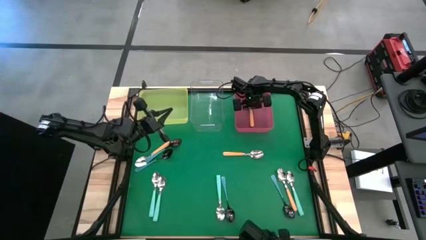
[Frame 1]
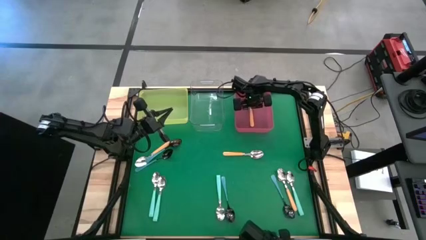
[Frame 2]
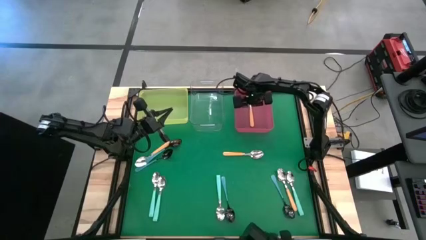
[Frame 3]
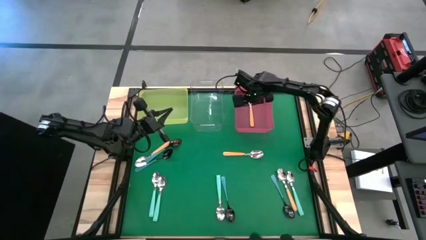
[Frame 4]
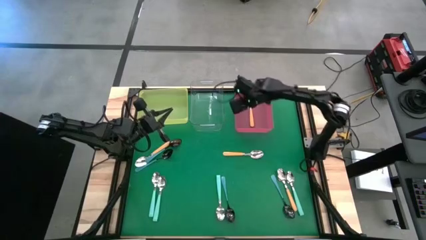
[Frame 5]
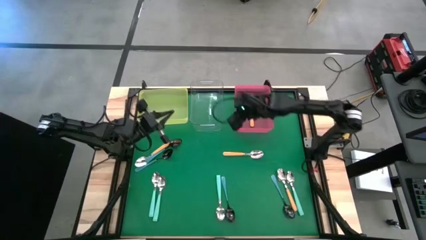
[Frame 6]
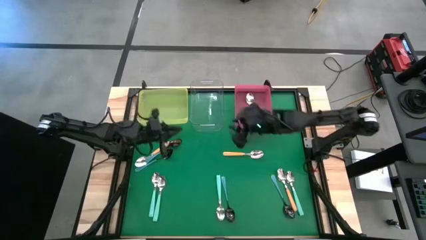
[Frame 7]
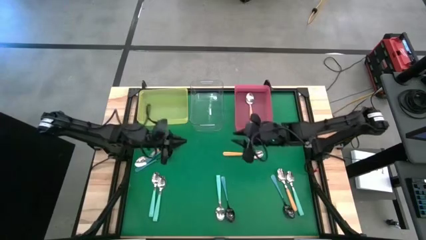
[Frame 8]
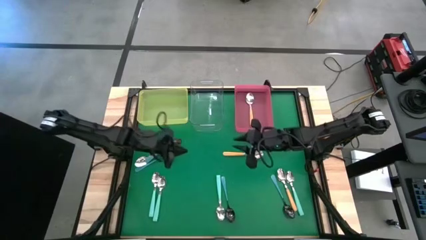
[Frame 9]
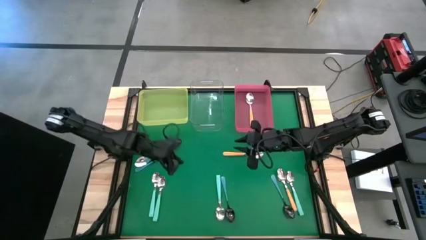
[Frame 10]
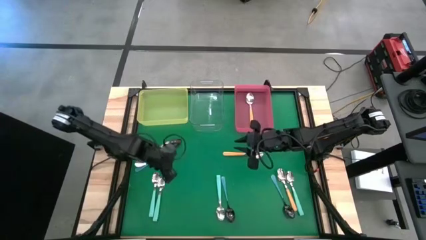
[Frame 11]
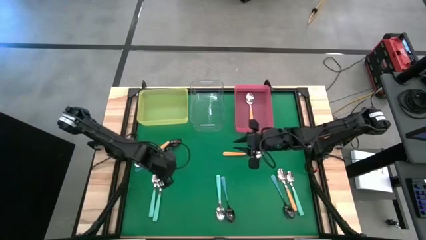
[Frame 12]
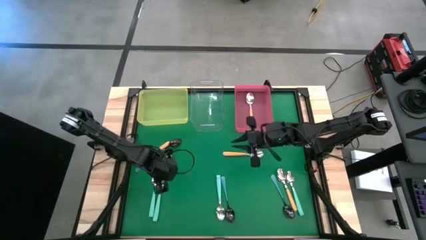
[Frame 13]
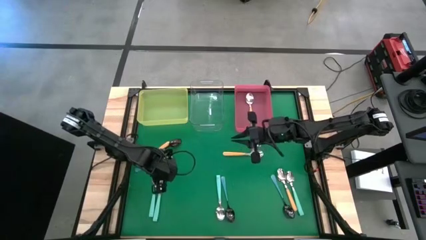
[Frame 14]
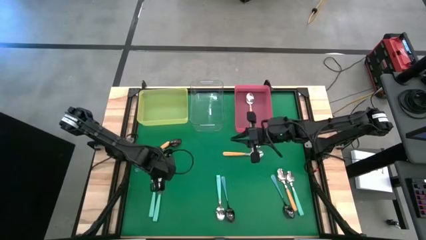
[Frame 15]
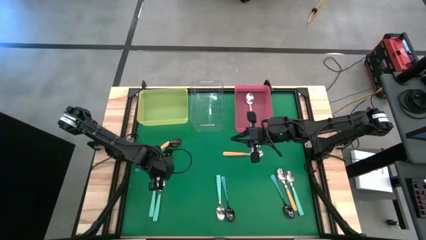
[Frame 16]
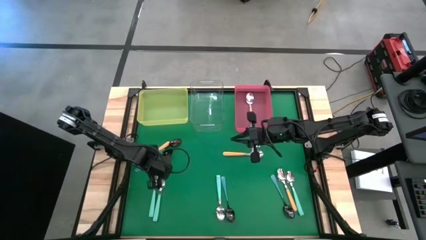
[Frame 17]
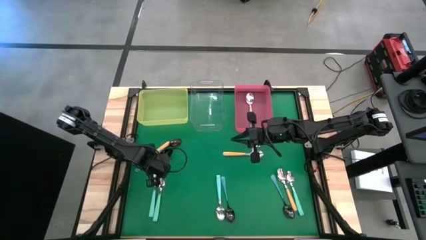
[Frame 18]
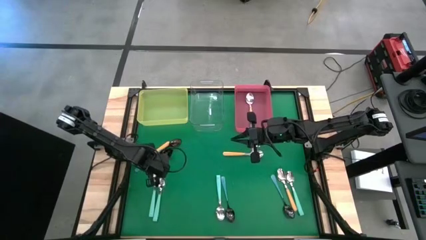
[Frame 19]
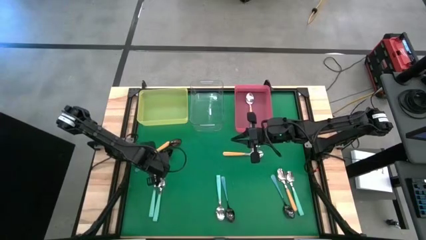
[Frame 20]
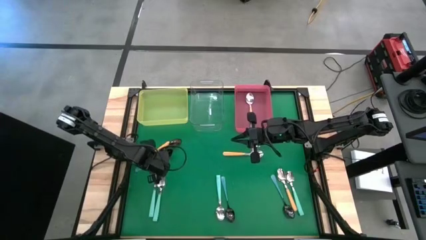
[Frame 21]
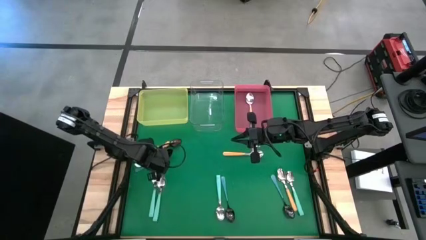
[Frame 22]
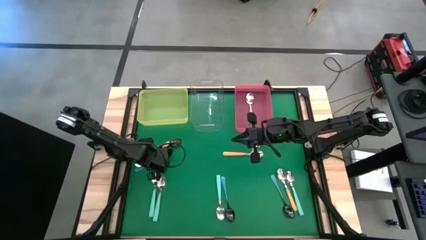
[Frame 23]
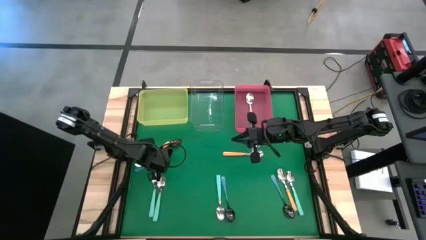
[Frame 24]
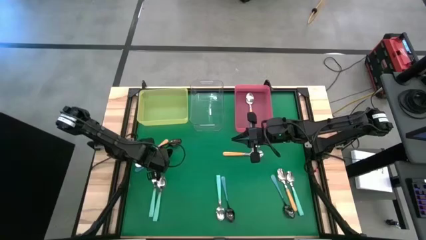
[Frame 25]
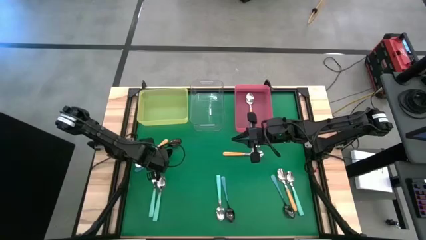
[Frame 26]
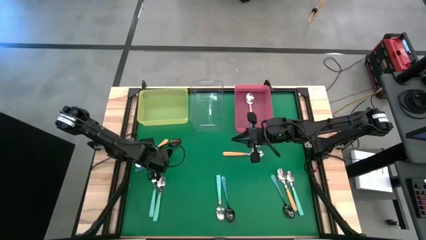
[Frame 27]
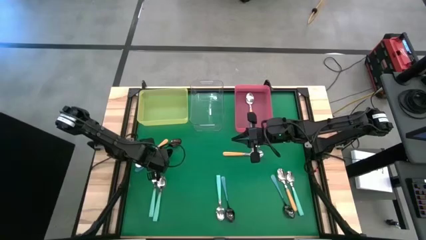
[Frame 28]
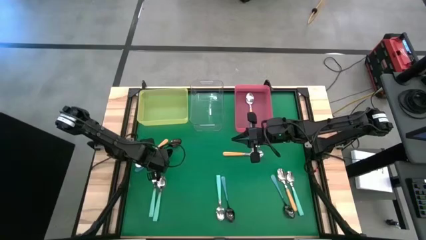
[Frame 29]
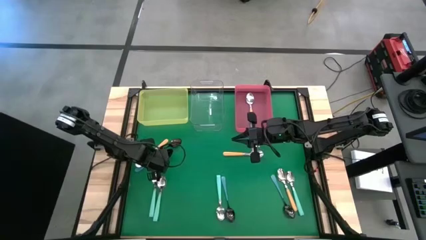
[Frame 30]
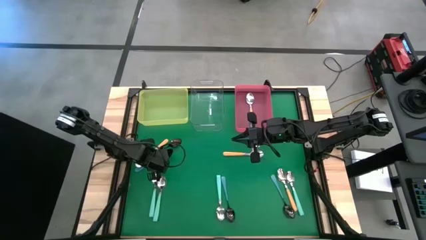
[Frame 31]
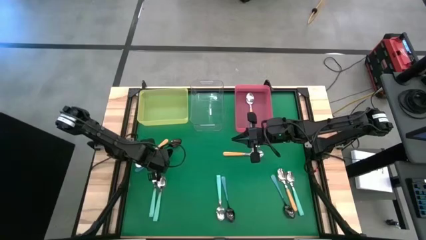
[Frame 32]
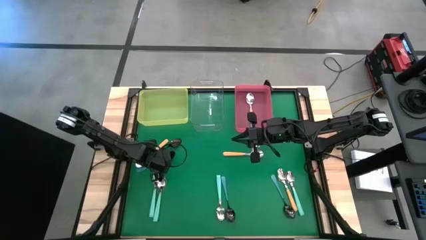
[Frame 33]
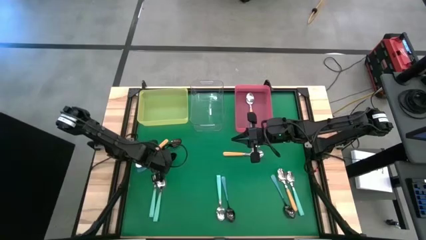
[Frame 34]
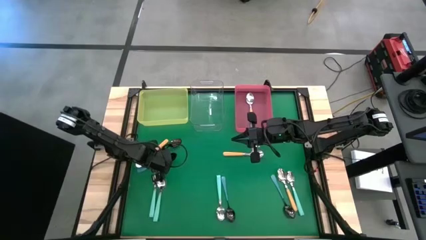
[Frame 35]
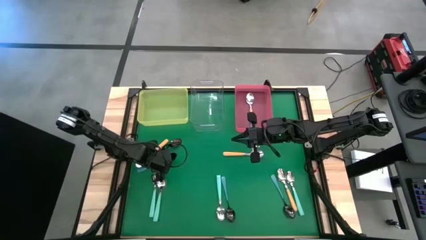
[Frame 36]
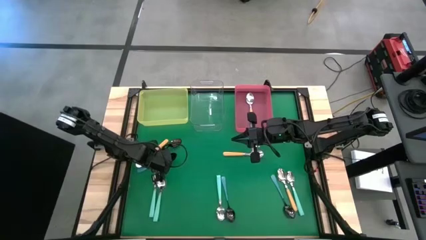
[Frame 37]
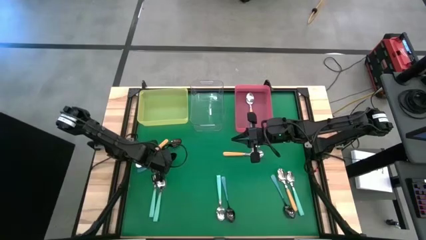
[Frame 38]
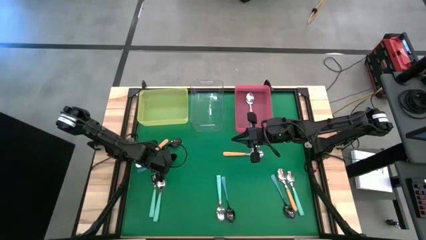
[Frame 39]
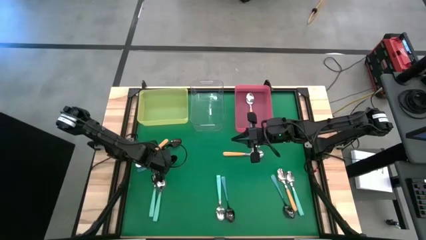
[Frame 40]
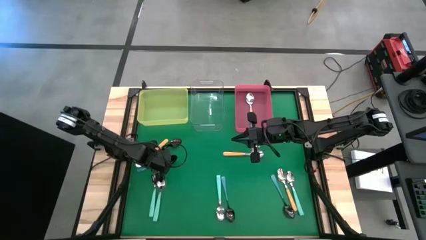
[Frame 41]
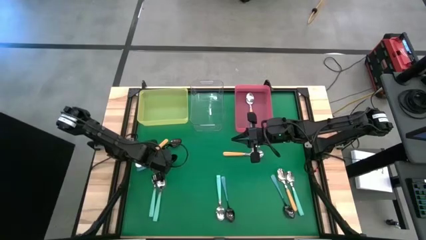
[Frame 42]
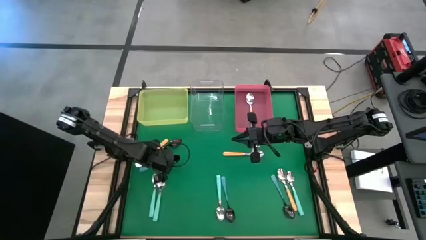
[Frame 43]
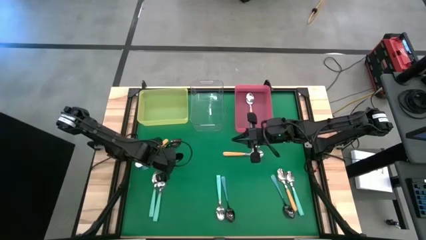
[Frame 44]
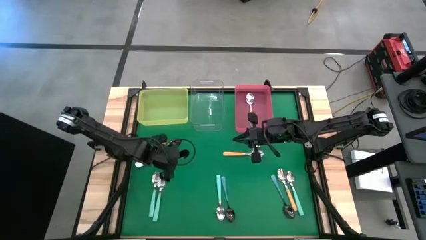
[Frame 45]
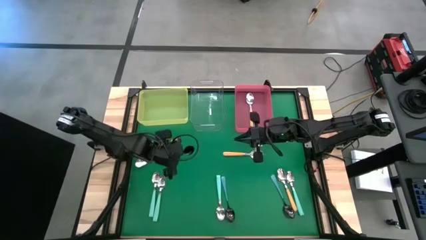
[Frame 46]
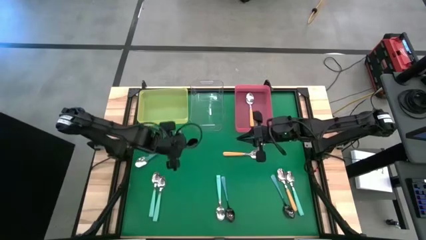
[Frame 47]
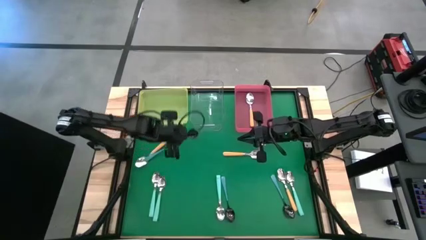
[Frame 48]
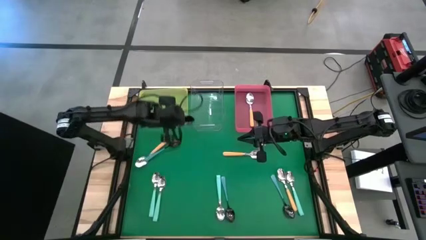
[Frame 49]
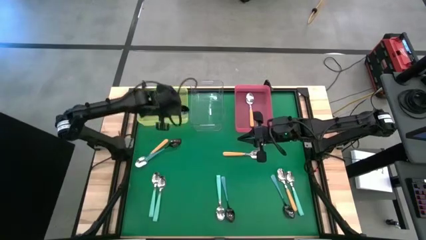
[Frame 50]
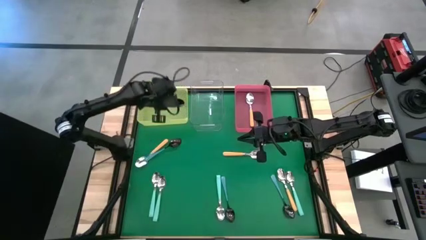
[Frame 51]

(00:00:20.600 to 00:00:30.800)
Task: Sort silverware by color (type)
Put the blue spoon into the yellow bin
